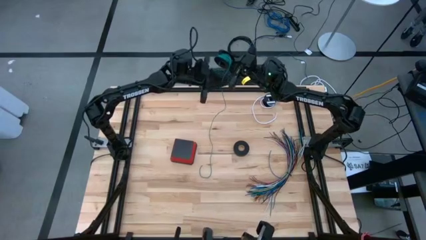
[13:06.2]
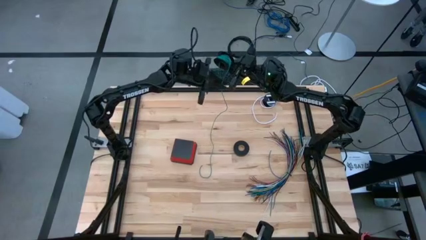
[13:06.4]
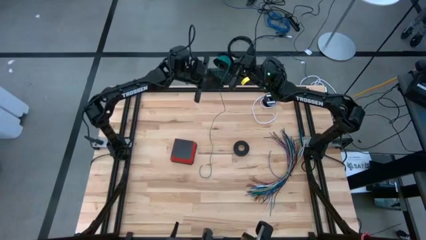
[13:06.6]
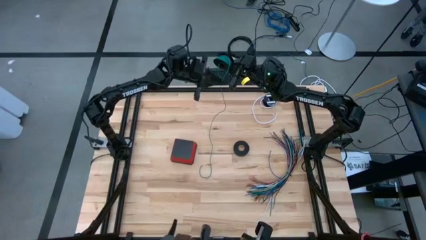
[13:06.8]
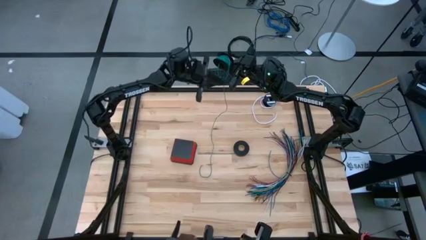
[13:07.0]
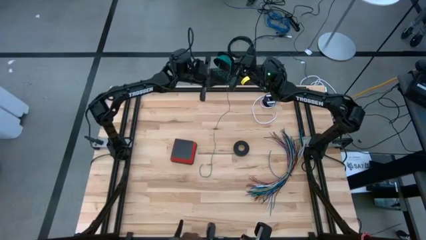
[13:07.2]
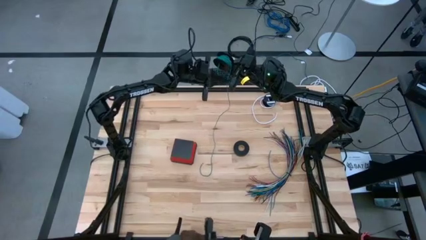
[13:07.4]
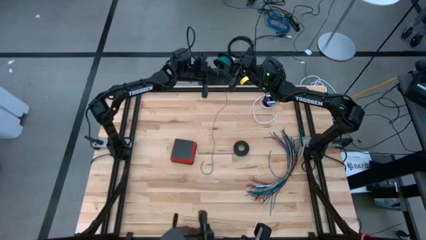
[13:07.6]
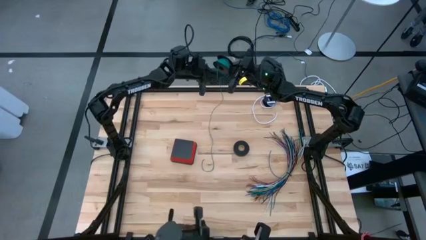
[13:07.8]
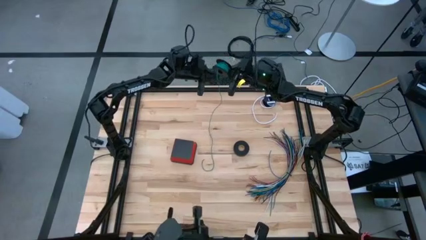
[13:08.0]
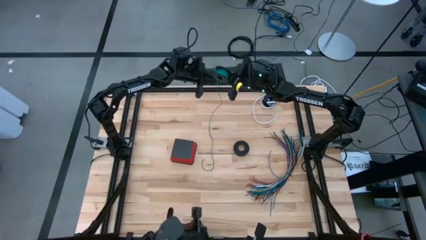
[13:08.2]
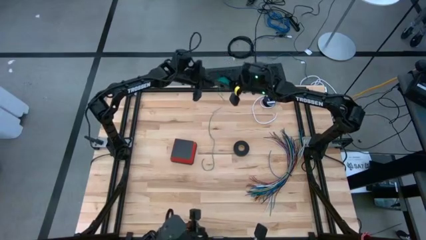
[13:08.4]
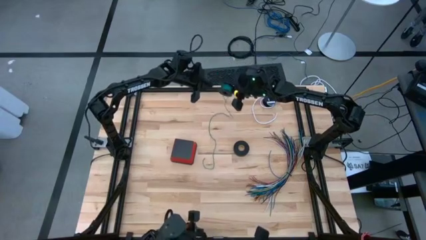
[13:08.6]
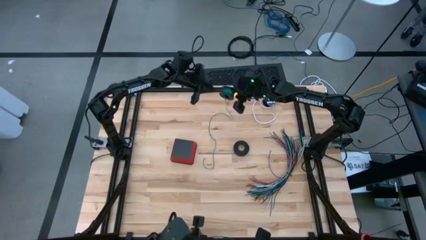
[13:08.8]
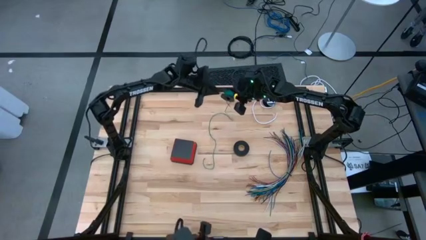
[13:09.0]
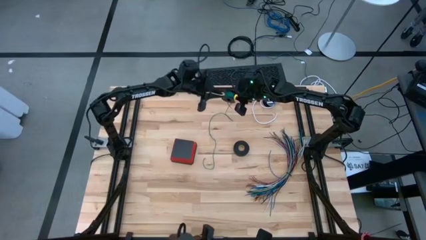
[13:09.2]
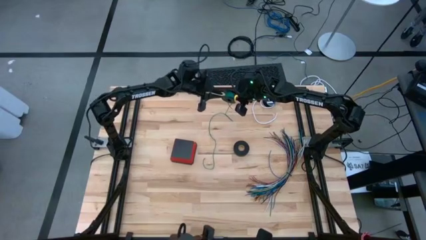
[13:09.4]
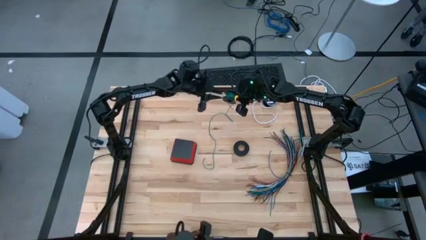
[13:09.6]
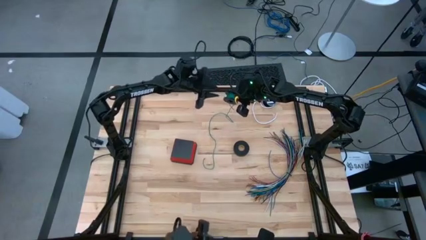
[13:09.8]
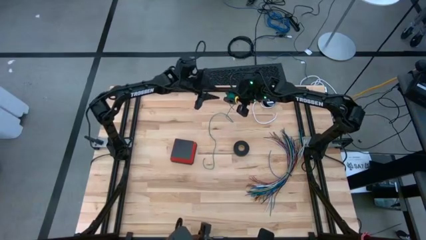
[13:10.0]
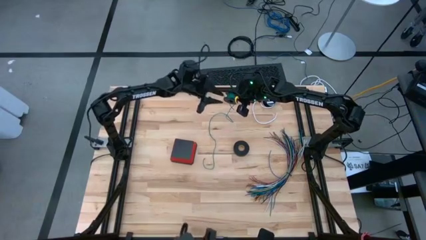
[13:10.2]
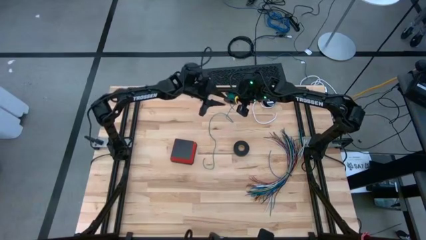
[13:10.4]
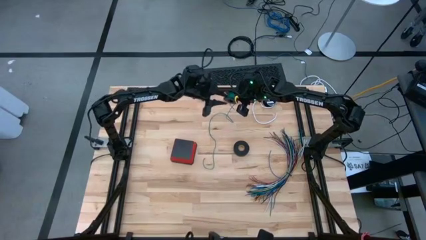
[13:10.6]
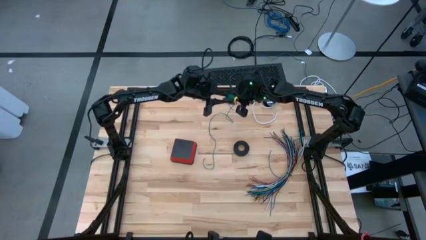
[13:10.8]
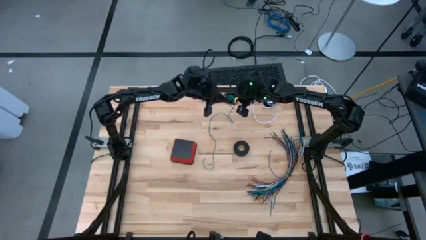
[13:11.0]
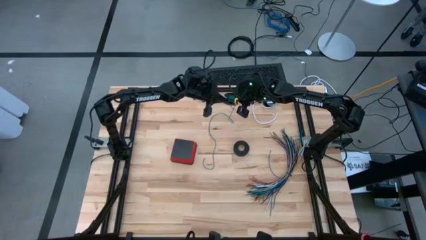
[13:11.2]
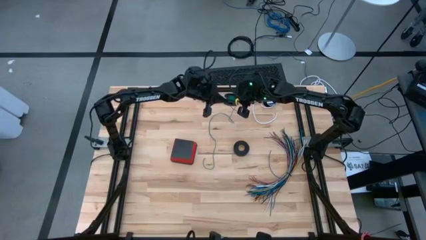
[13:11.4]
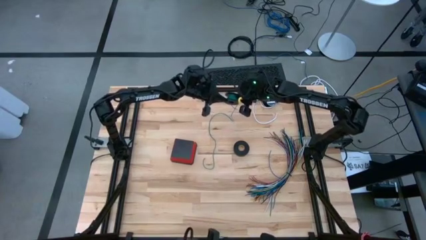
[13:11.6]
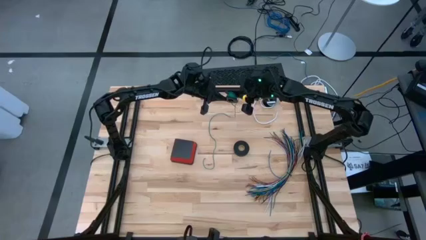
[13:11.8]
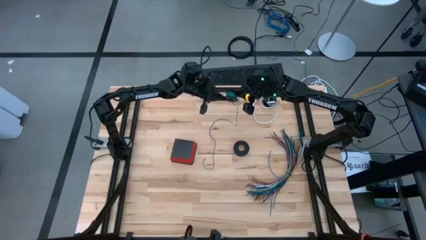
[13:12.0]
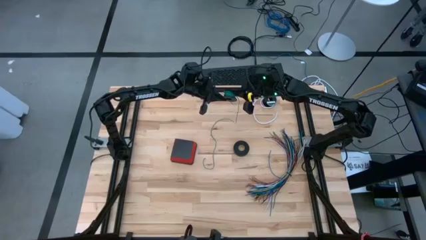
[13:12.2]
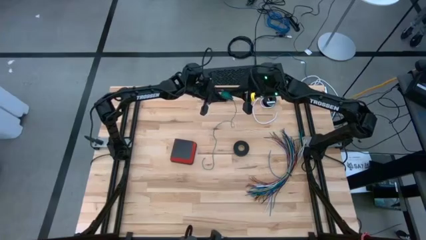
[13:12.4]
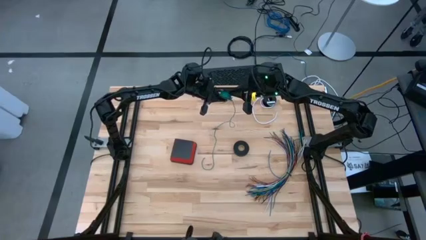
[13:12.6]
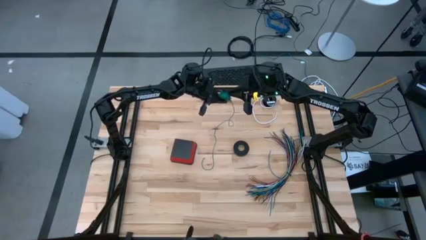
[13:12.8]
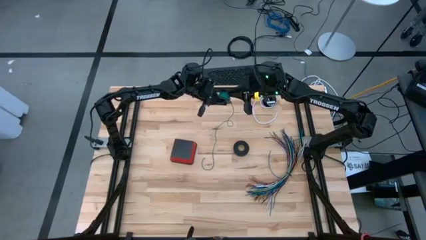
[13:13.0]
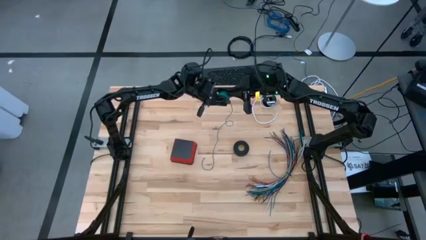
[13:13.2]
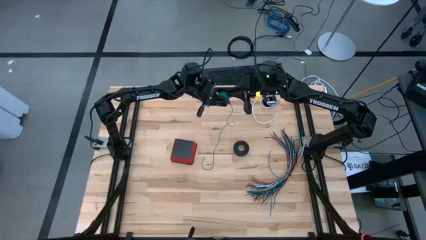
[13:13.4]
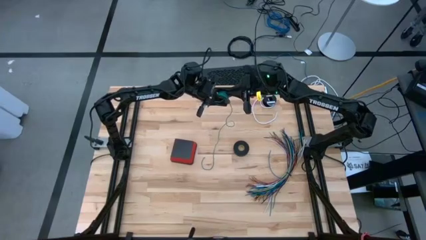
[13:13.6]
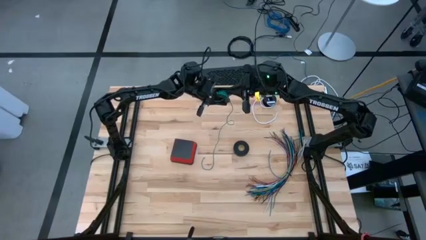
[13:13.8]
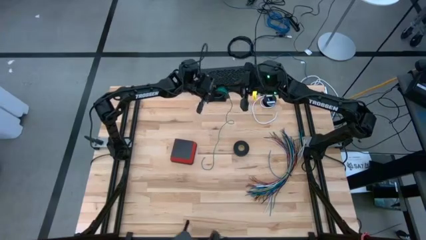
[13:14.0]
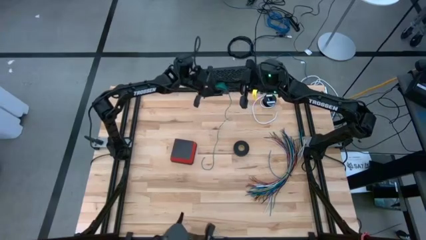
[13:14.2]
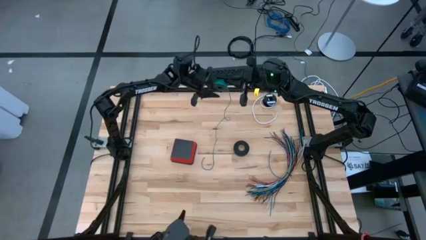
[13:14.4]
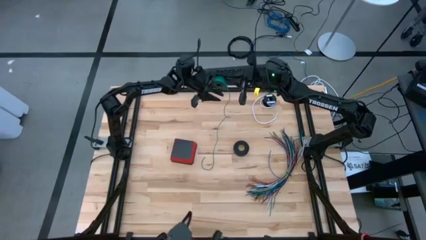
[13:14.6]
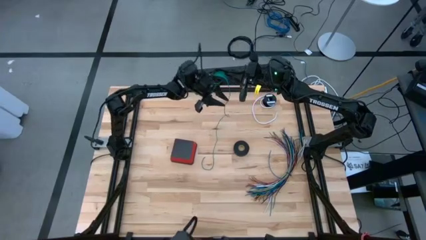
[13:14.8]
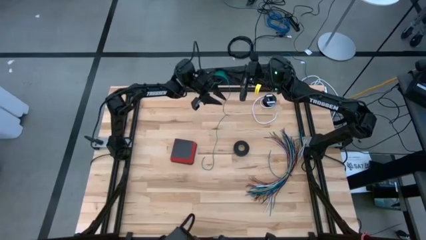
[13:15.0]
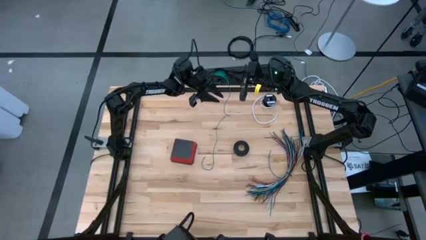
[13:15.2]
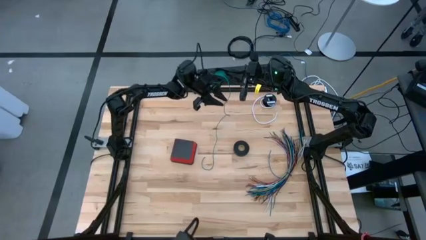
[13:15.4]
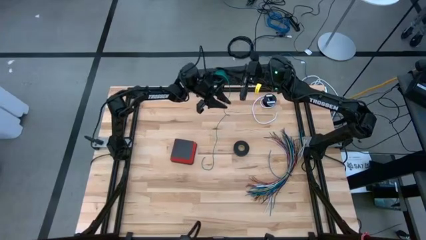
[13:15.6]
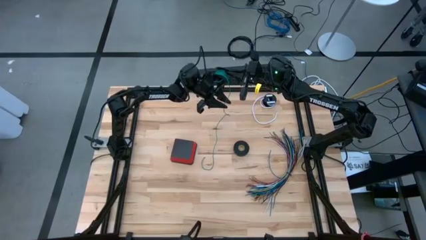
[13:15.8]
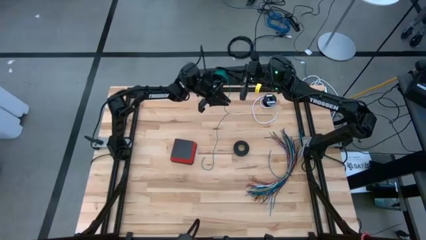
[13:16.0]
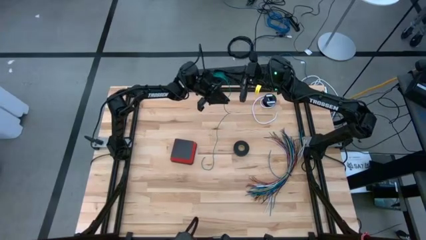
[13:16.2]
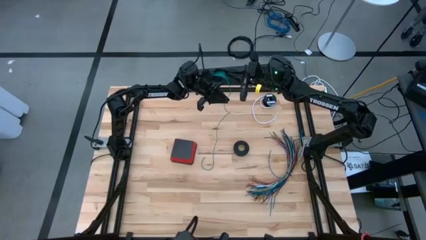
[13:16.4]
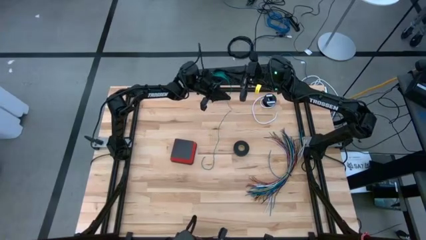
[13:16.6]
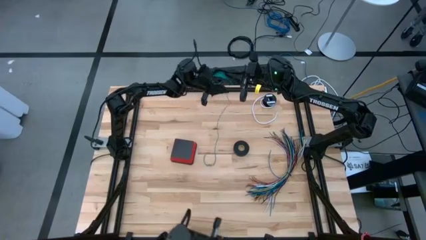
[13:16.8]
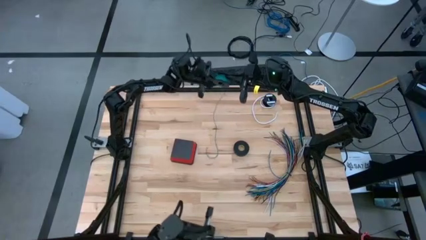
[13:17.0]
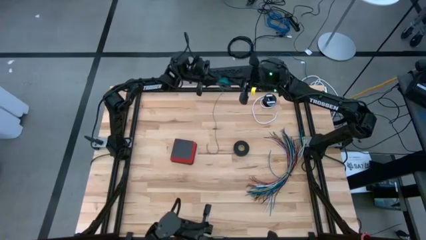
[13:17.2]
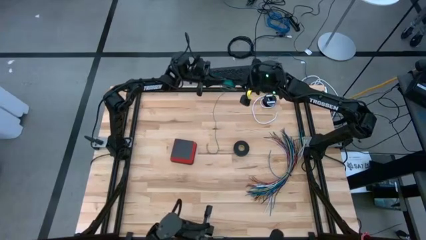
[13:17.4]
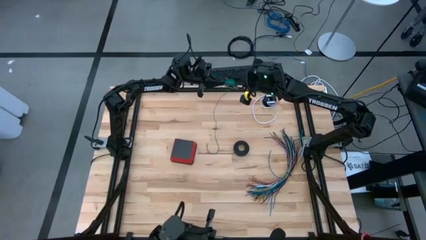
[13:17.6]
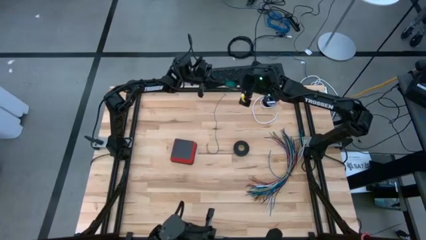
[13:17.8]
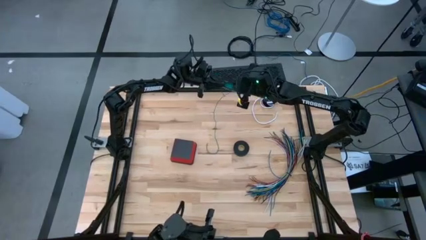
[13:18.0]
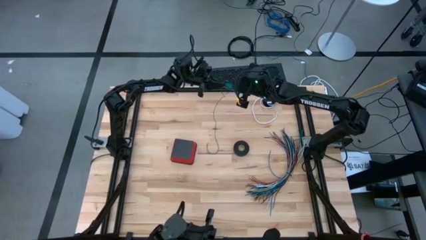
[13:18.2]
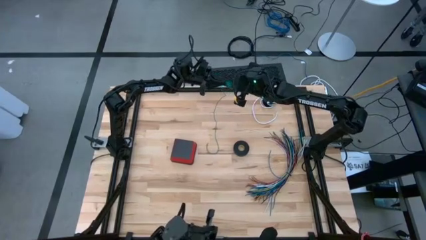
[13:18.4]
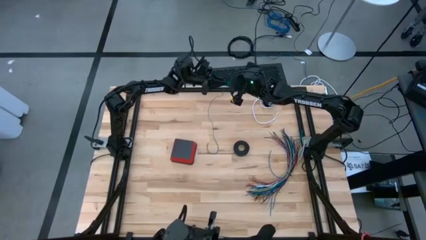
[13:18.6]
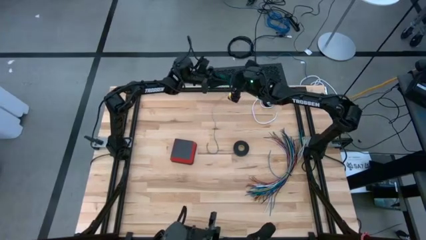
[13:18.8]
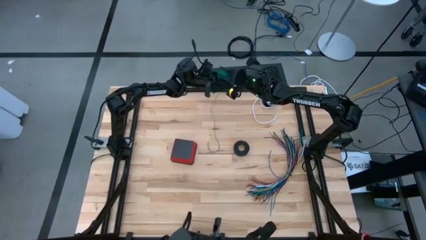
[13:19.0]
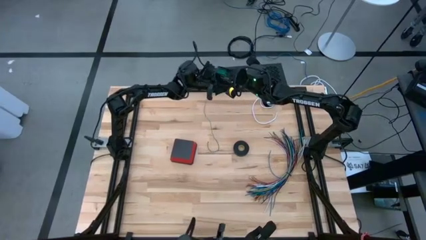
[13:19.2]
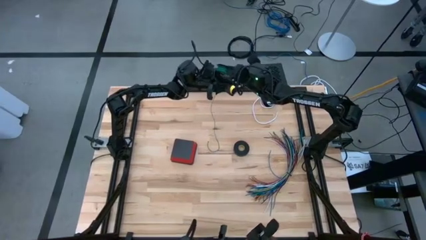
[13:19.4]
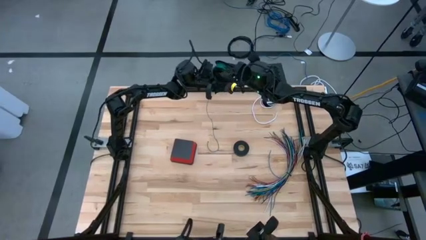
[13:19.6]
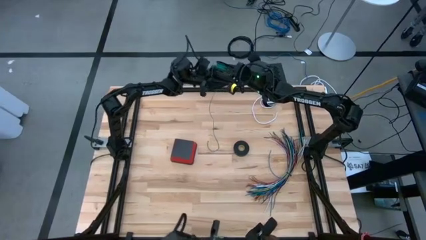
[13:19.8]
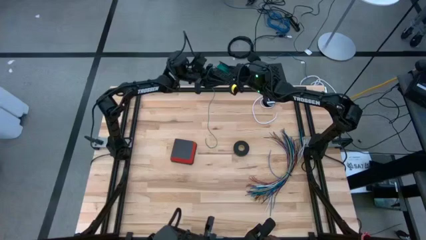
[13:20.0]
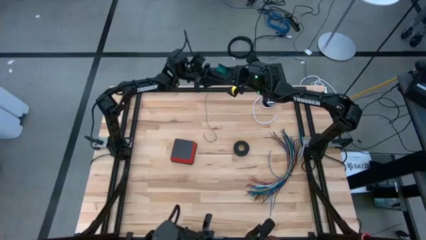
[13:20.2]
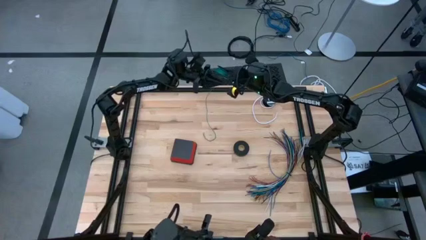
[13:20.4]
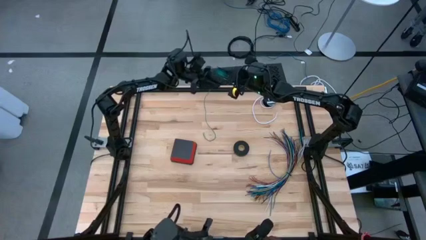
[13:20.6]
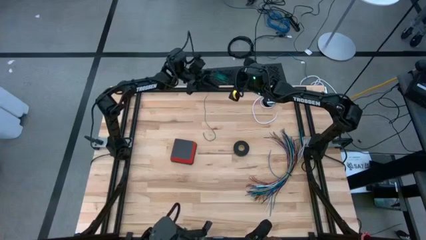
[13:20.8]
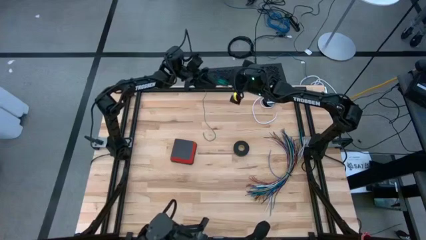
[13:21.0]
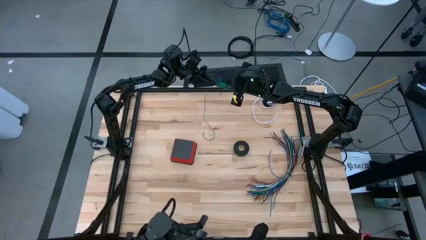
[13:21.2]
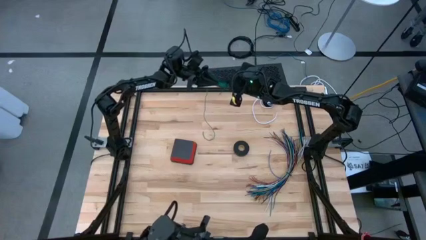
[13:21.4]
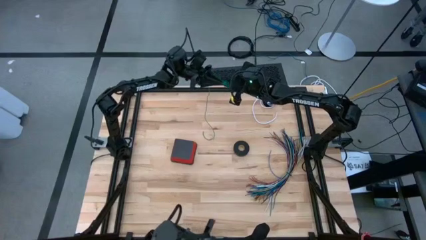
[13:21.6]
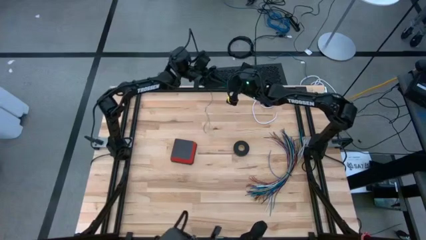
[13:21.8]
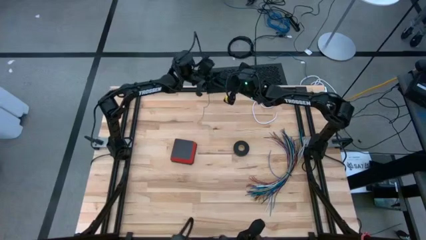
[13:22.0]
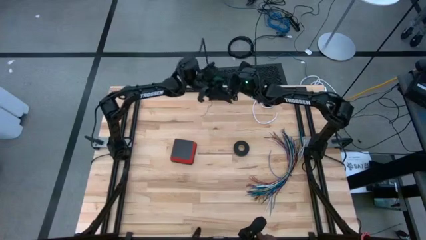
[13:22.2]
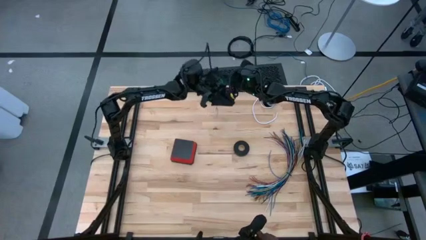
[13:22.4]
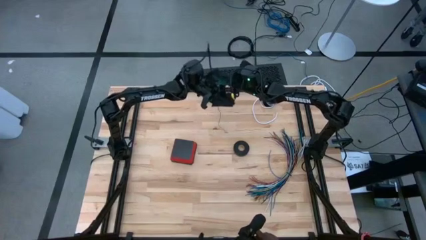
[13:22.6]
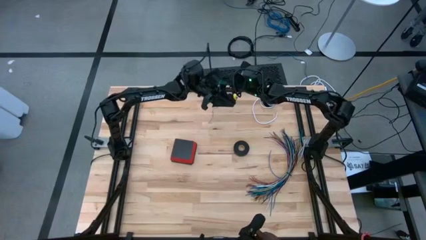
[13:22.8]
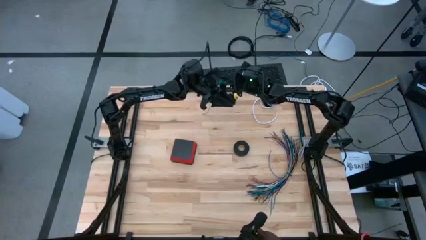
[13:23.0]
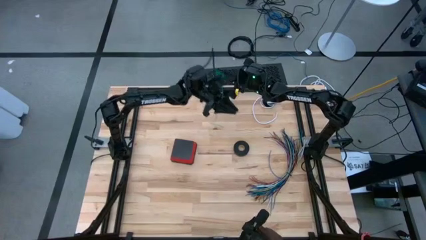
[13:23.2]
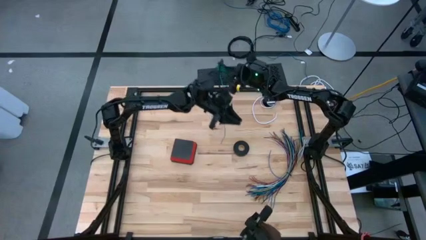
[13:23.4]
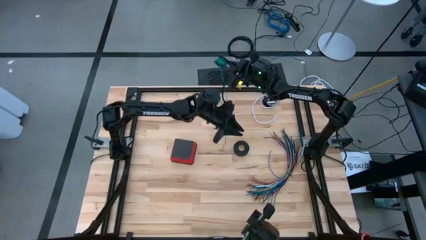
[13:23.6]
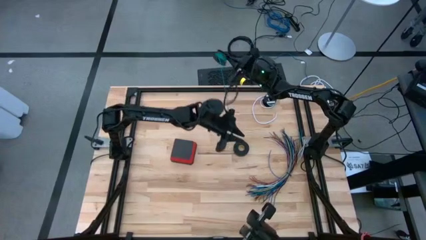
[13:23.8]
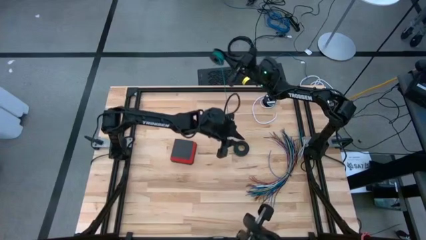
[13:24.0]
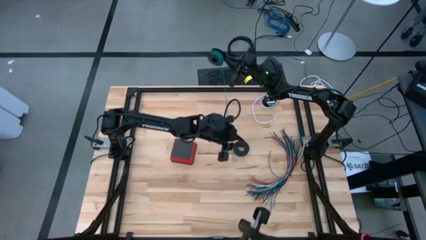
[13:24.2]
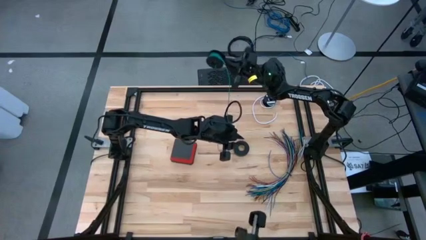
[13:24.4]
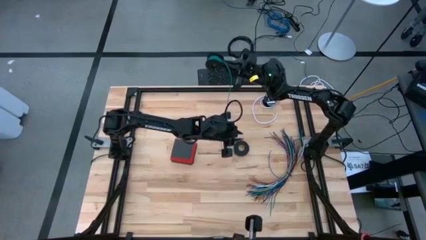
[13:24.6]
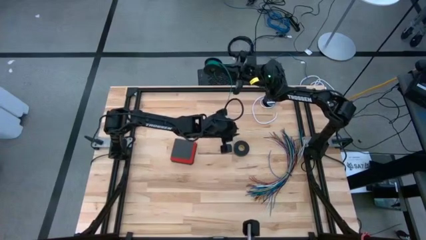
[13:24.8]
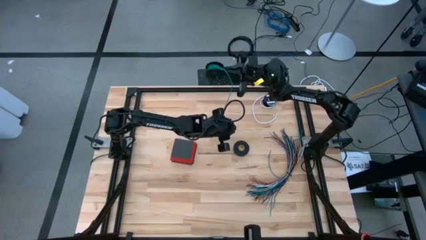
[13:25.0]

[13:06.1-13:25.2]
Task: Coiling cords
Coil the green wire cable on the spool
